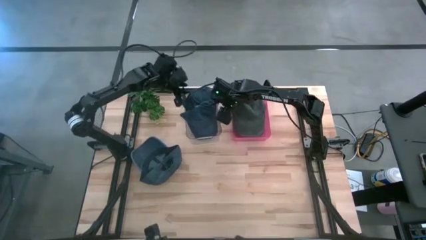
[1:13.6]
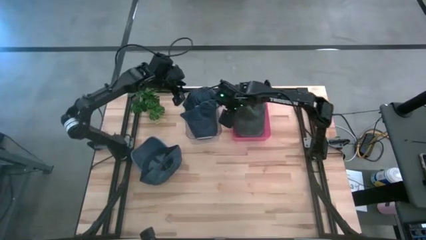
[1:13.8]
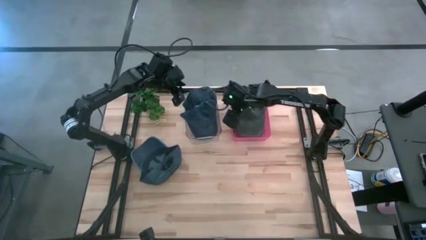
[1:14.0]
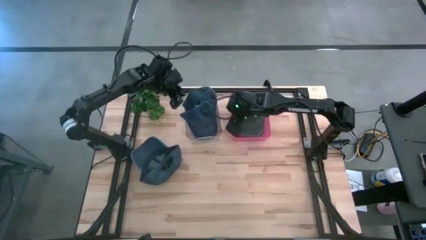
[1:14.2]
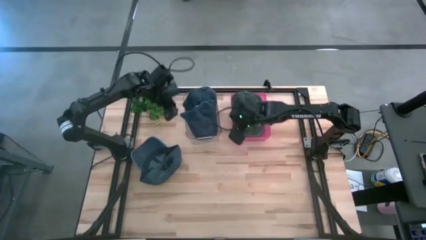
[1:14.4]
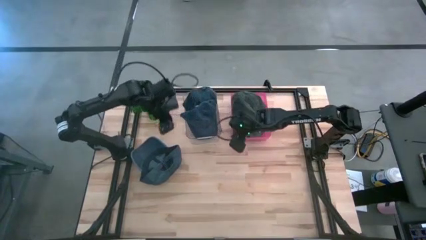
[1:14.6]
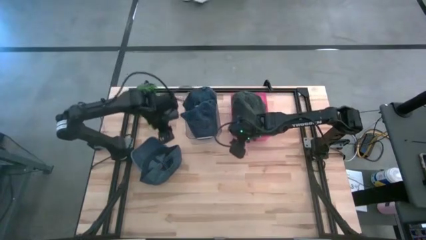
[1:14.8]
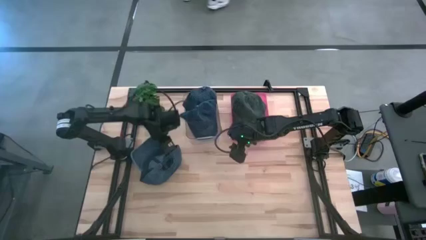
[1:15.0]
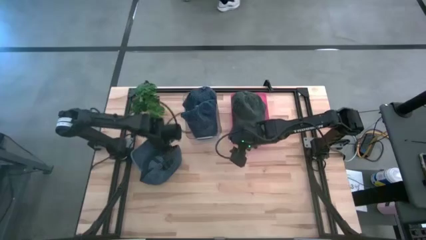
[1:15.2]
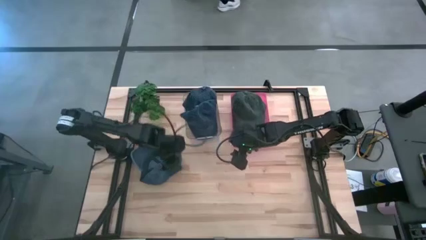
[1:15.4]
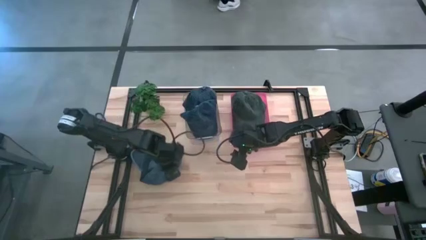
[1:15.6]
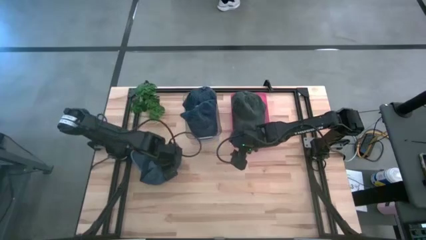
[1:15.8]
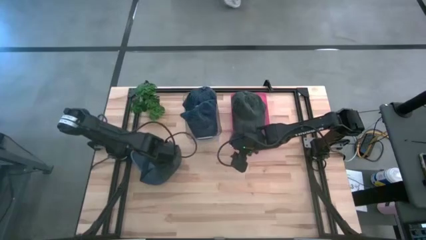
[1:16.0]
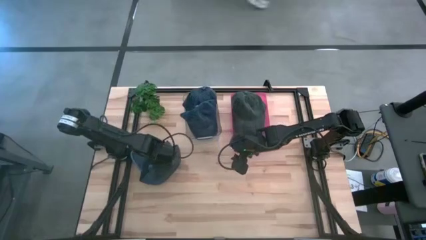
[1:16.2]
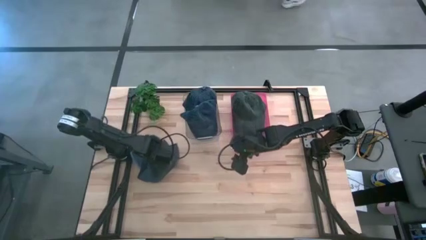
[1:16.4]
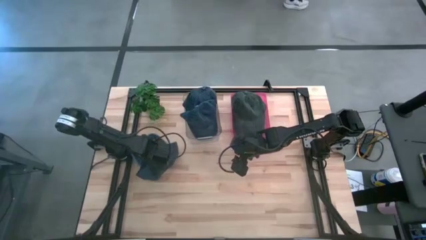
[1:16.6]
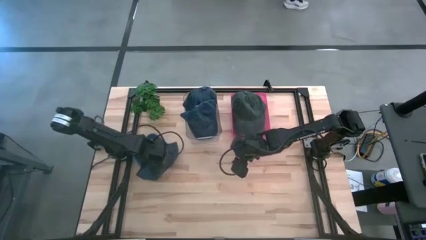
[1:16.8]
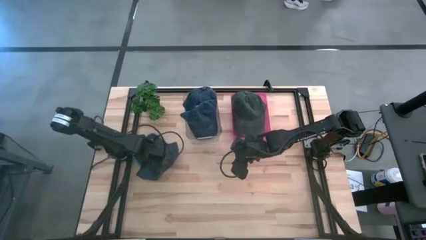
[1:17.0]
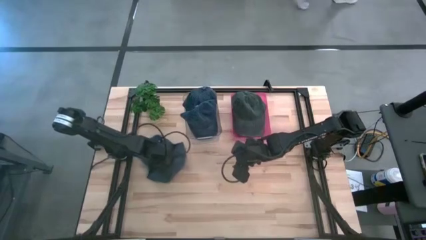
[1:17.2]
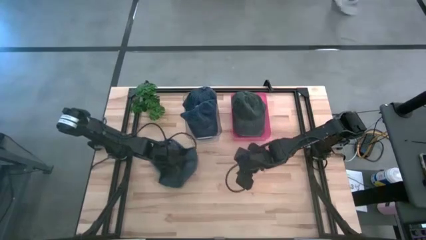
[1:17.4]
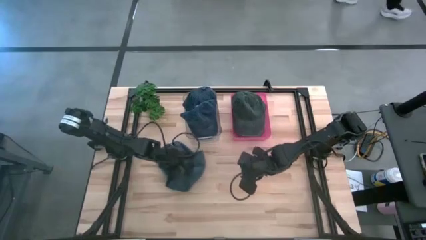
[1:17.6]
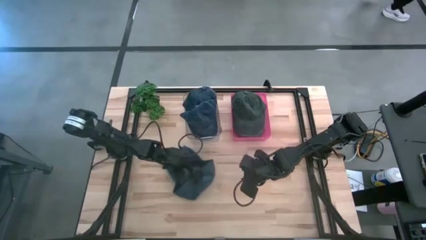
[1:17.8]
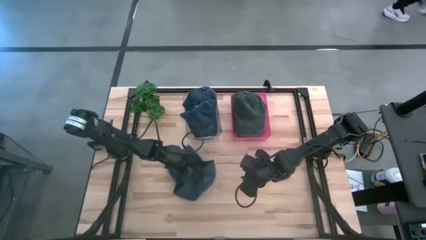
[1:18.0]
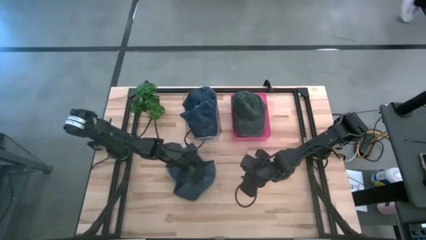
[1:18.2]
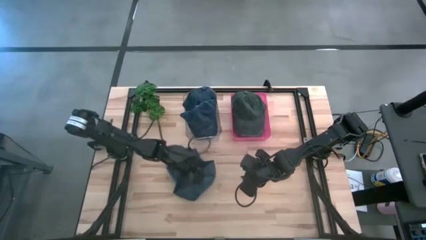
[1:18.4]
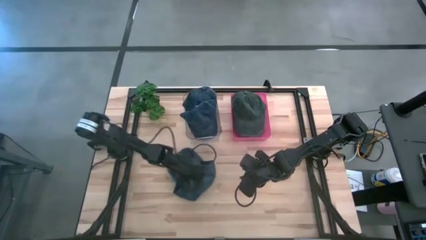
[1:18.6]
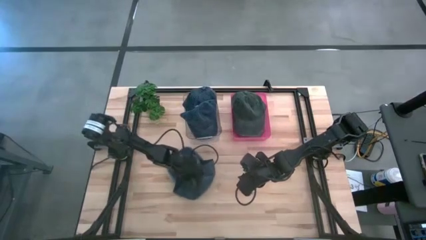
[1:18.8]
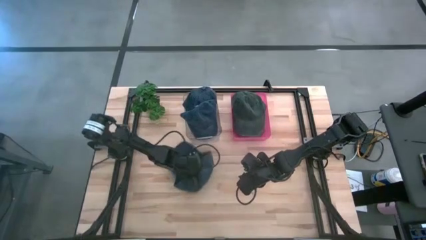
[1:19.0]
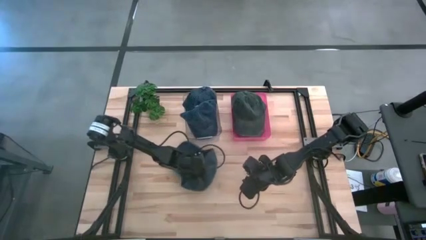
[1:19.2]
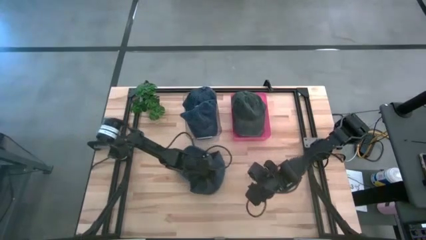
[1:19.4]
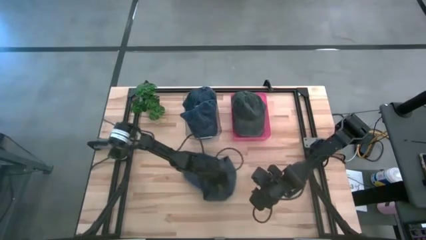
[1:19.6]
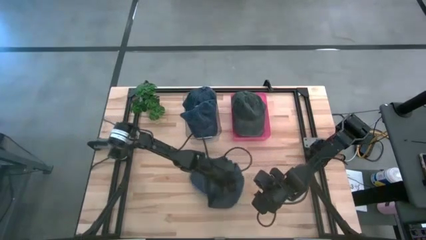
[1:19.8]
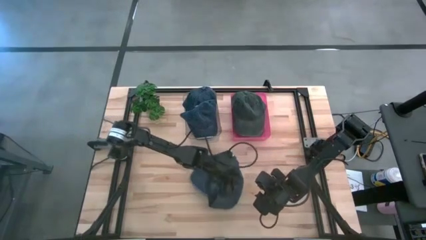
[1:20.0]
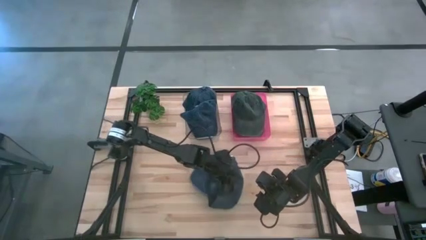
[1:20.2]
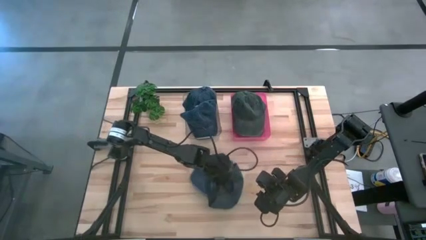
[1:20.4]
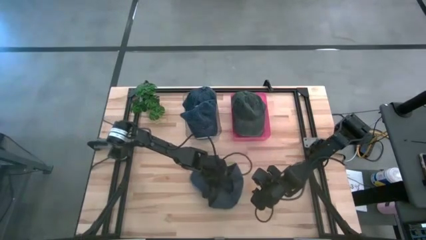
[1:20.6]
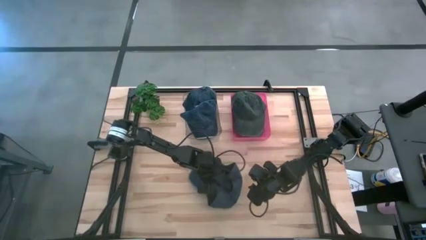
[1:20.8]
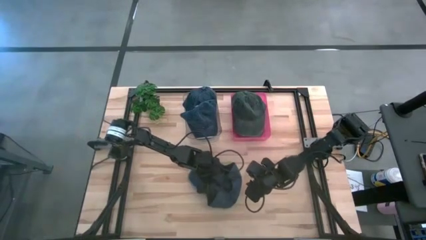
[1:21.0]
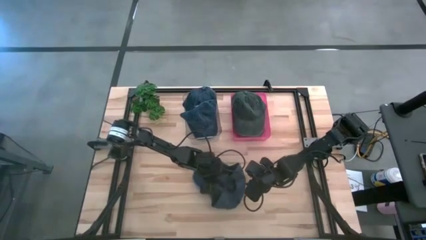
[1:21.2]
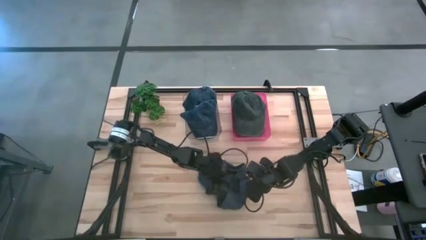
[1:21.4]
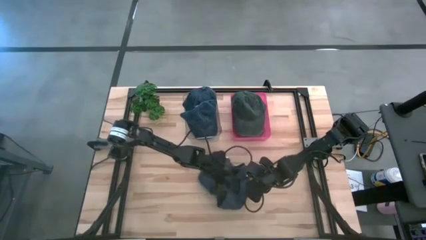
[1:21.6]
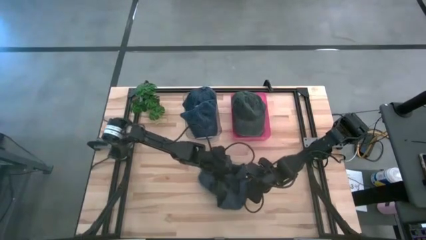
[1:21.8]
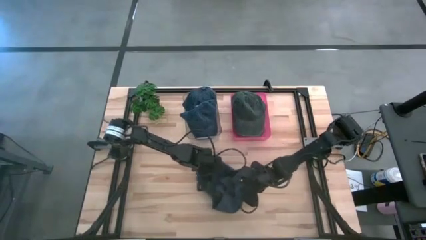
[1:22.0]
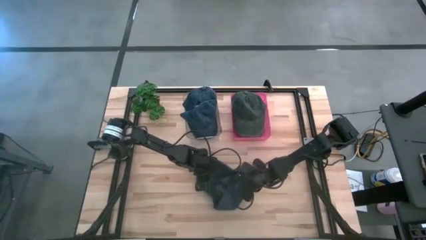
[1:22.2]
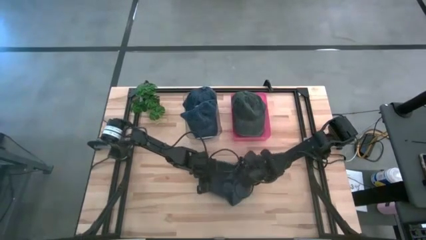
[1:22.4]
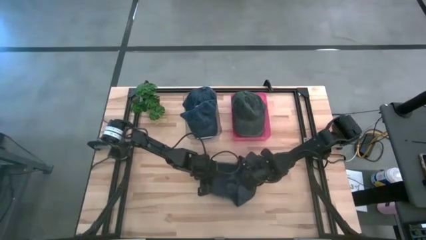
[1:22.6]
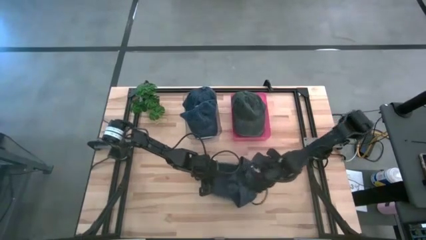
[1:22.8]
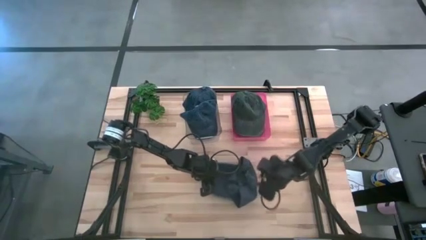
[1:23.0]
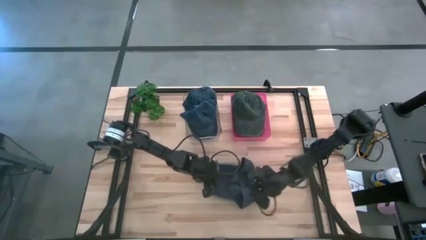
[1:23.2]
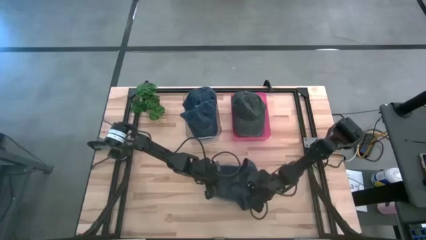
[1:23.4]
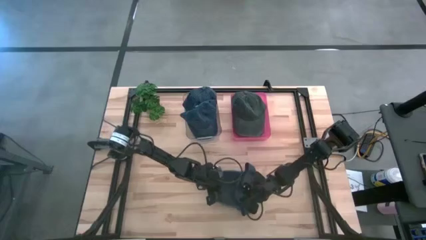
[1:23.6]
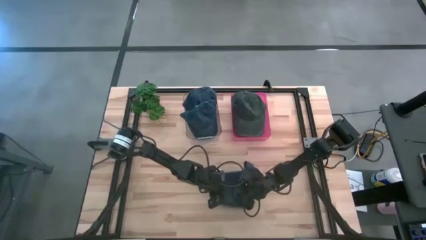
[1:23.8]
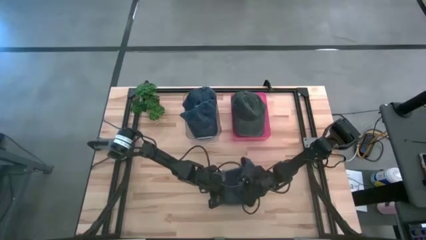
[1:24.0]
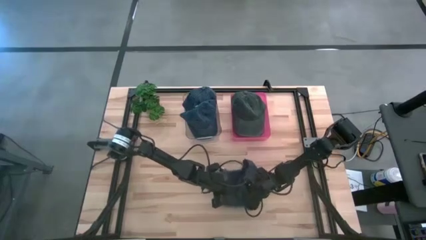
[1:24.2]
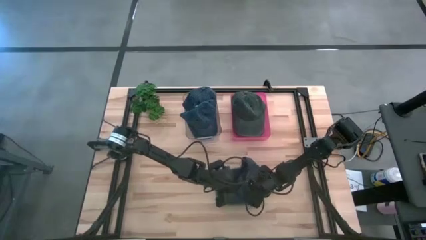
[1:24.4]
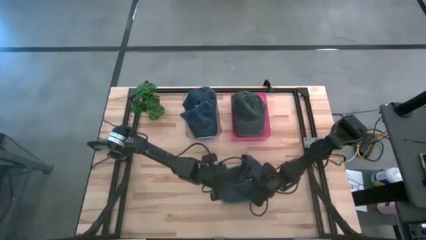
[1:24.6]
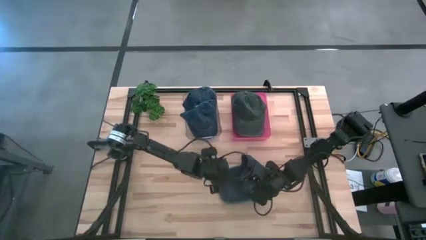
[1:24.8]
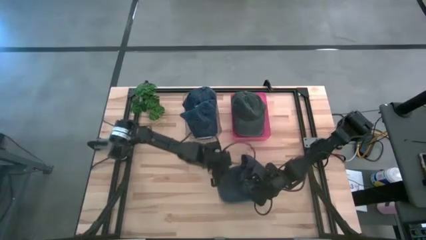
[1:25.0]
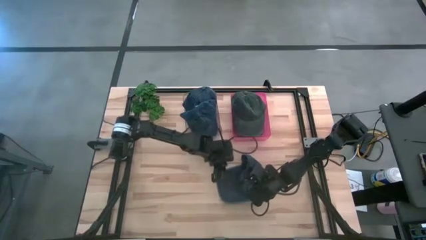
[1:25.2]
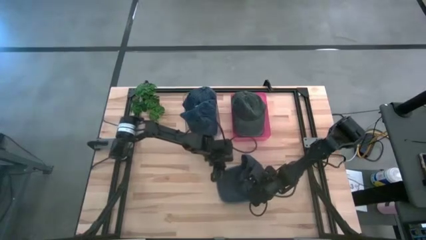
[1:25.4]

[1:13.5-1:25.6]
Task: Pick & Place hat
Put the blue cap into the transparent bin

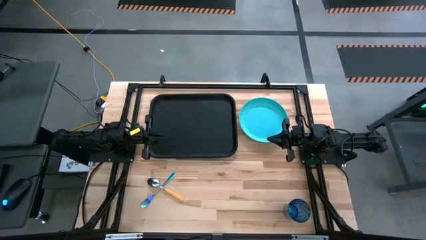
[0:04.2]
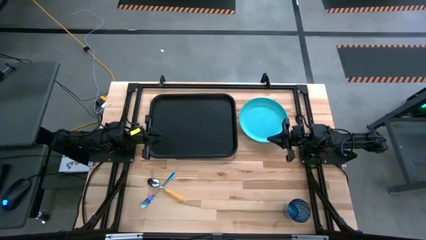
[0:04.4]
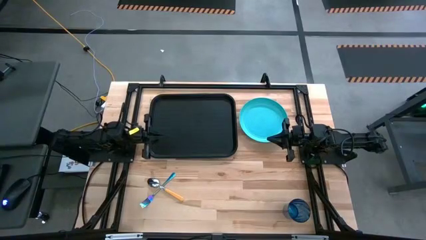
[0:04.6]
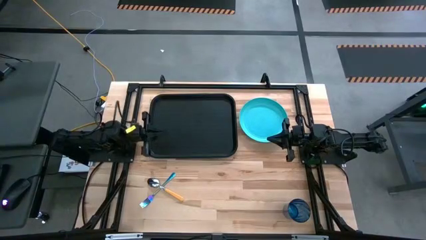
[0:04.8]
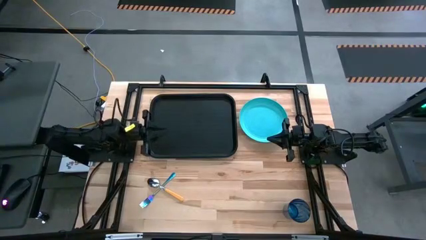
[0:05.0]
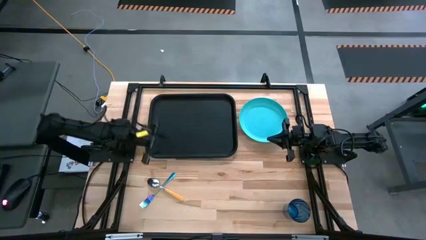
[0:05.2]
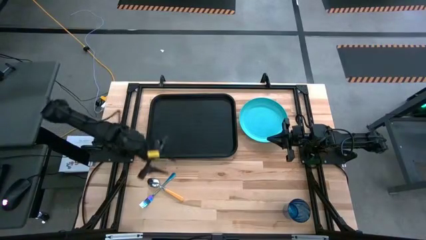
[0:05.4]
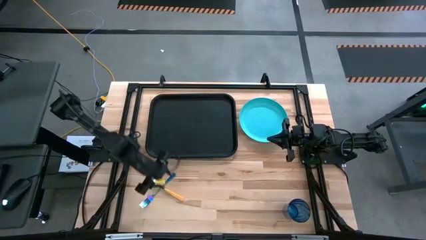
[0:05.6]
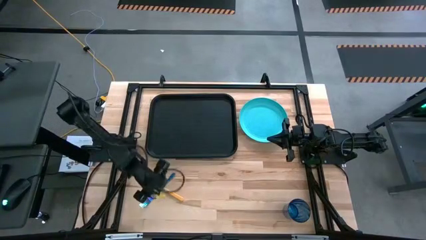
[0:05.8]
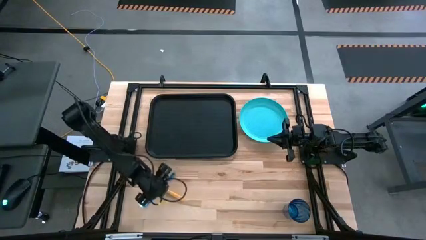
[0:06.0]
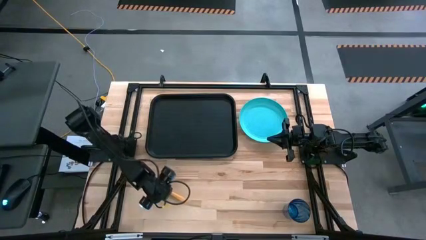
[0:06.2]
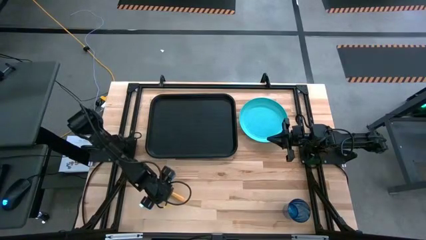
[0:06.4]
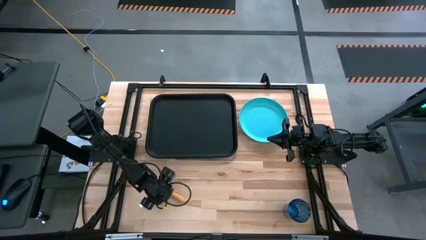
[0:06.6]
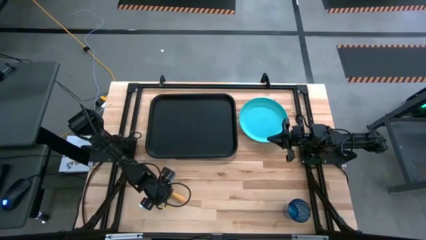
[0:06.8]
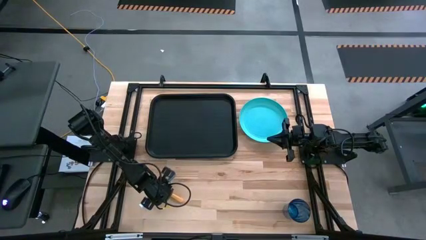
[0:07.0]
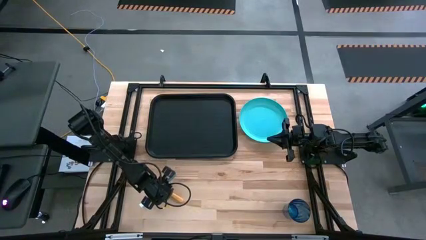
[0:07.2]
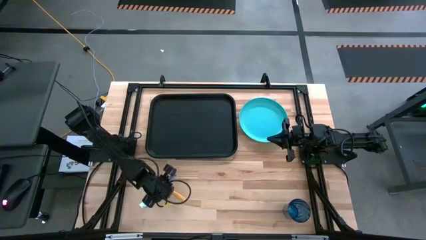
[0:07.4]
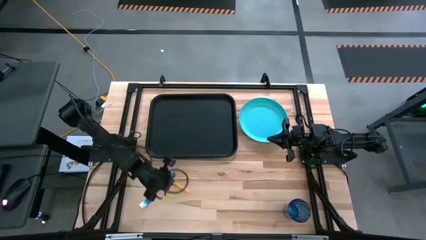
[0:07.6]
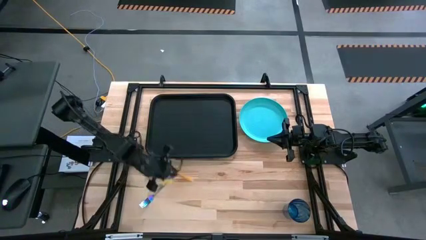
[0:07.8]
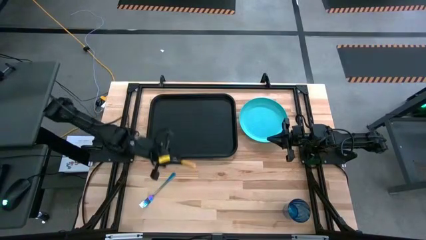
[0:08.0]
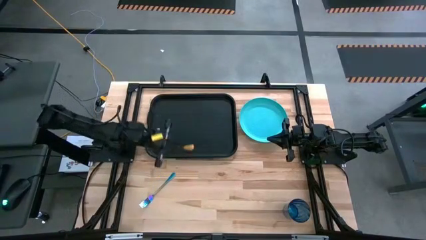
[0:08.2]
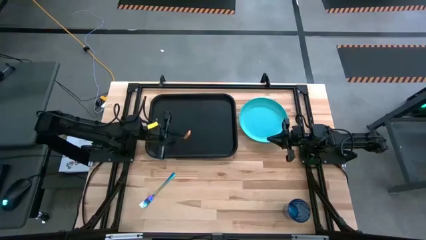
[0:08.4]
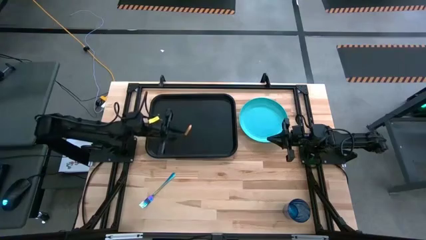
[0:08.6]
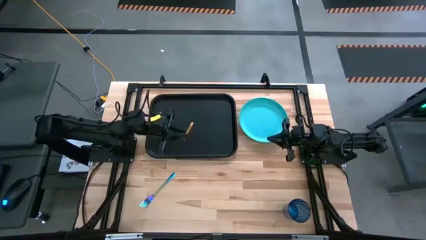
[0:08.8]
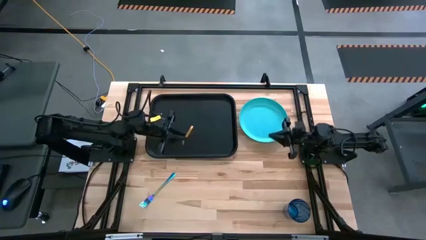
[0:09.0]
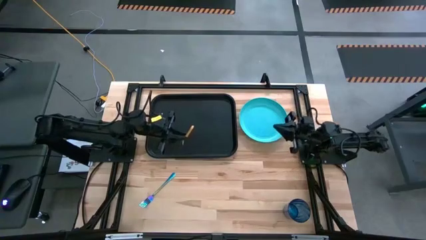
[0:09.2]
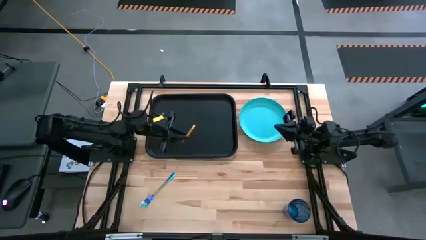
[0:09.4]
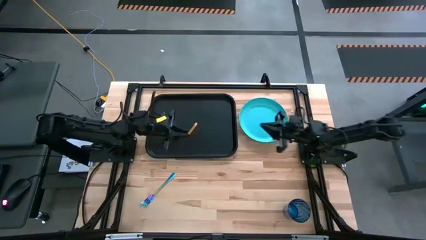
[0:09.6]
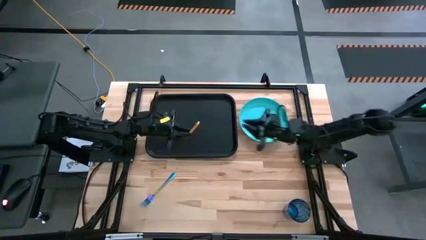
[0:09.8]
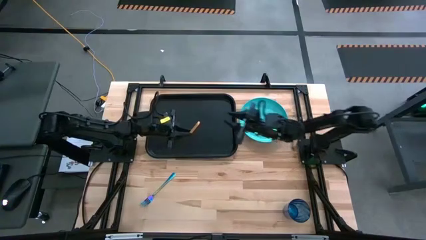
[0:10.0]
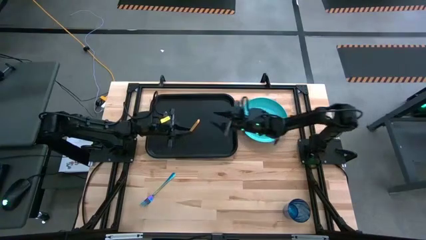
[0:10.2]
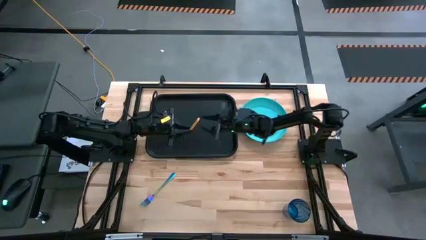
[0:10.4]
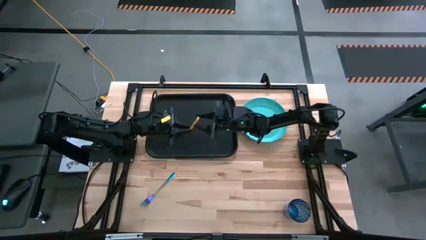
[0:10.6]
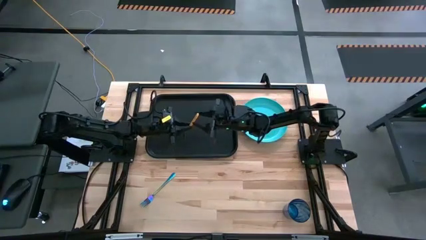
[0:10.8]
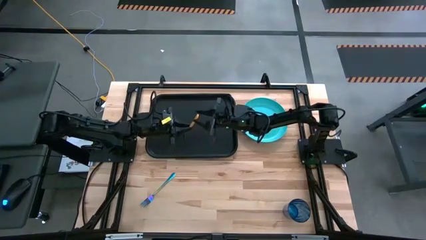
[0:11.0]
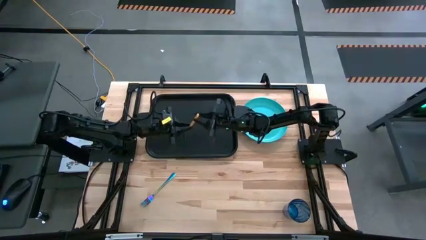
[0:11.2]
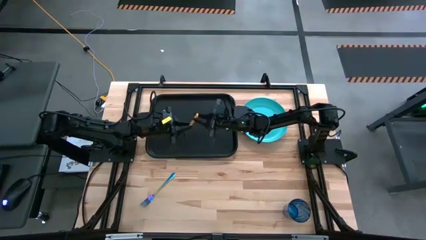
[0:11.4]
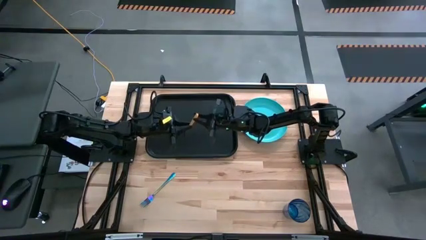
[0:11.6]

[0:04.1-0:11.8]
Task: Pick and place plate/cup/fork/spoon on tray
Put the yellow spoon on the black serving tray
